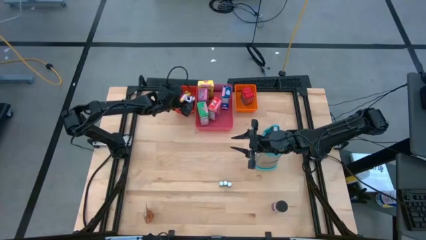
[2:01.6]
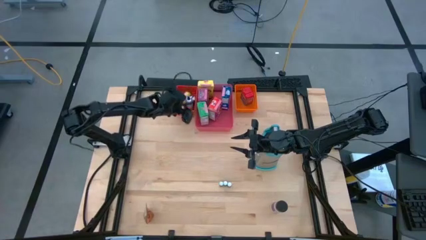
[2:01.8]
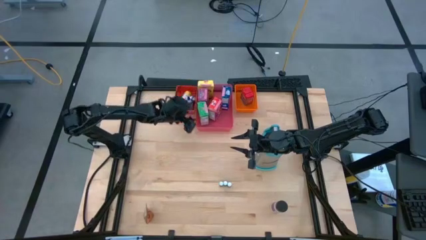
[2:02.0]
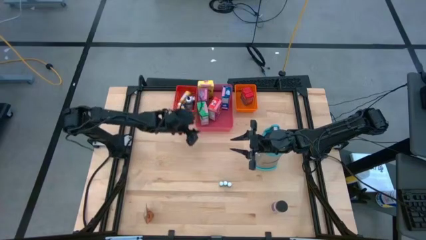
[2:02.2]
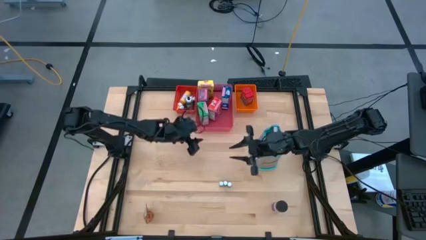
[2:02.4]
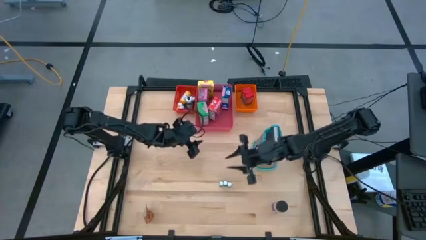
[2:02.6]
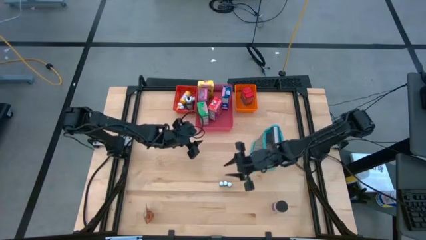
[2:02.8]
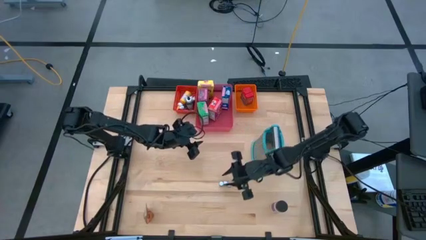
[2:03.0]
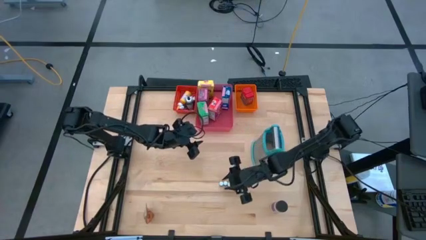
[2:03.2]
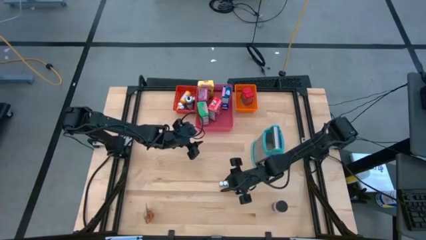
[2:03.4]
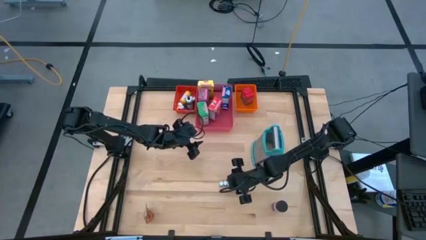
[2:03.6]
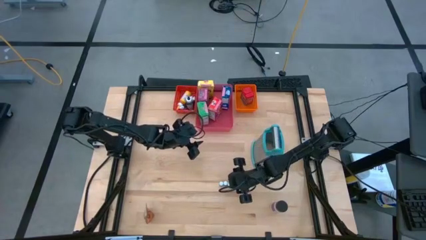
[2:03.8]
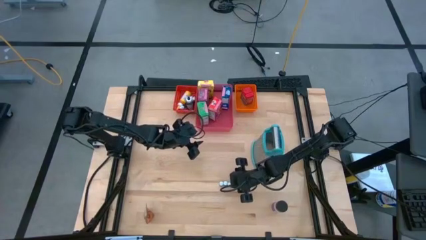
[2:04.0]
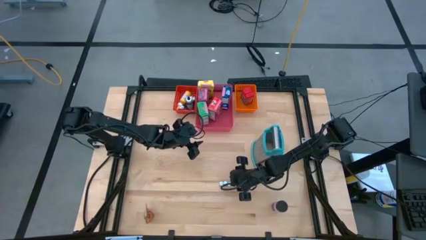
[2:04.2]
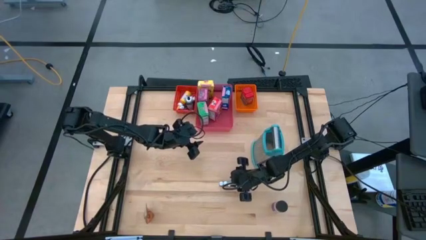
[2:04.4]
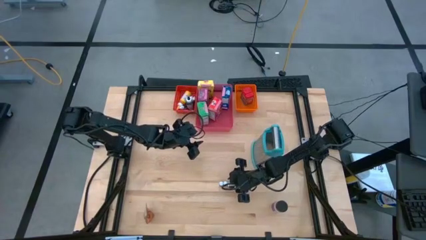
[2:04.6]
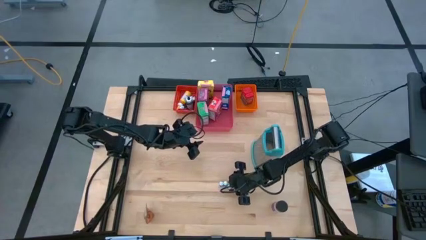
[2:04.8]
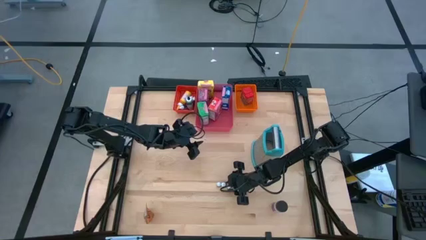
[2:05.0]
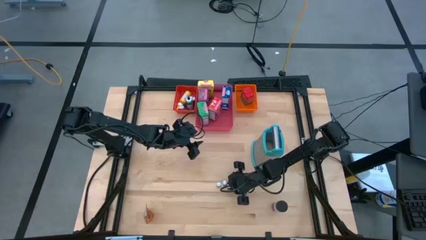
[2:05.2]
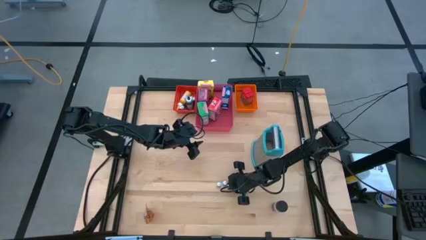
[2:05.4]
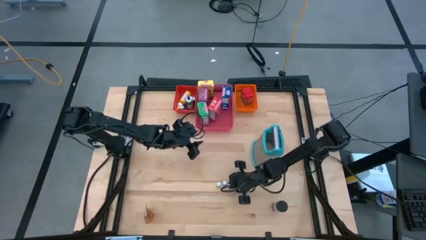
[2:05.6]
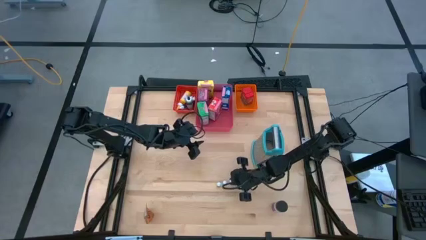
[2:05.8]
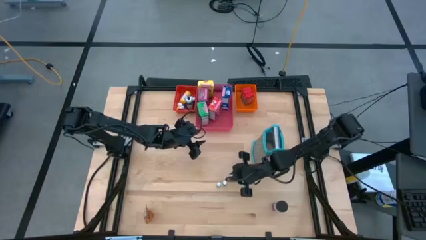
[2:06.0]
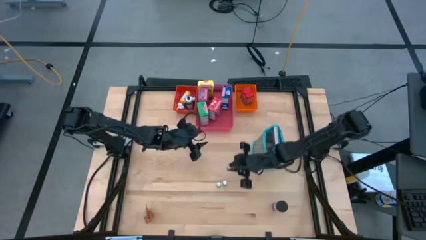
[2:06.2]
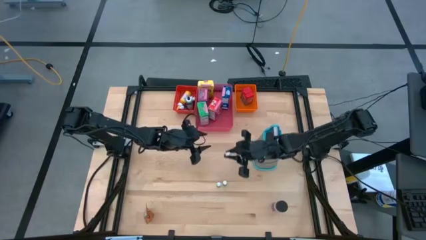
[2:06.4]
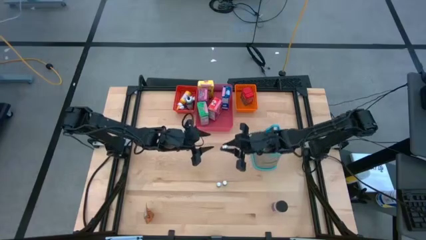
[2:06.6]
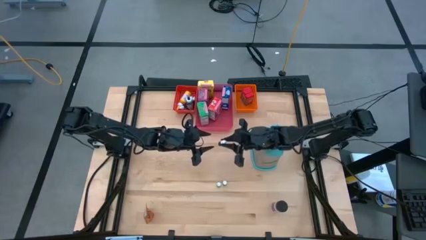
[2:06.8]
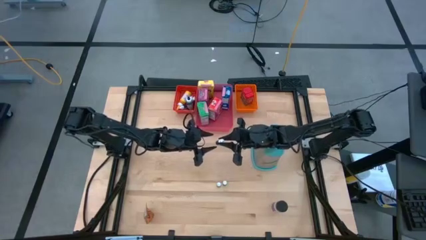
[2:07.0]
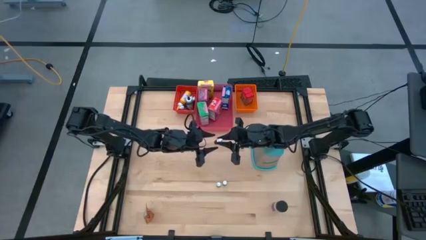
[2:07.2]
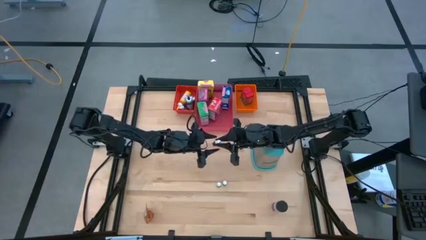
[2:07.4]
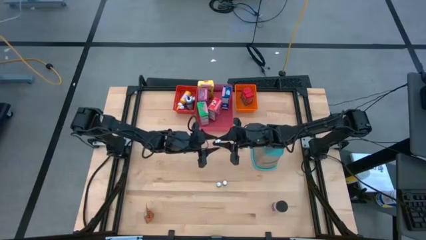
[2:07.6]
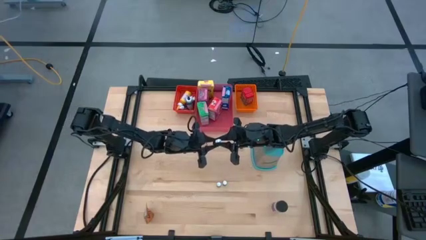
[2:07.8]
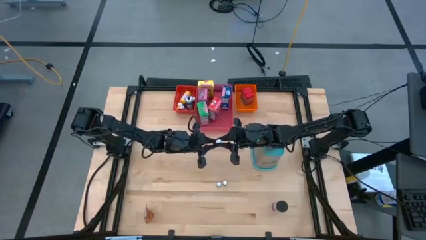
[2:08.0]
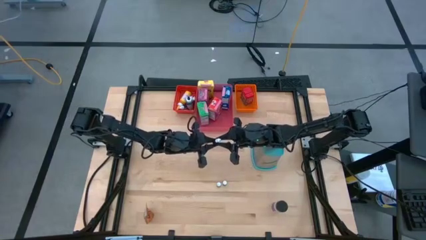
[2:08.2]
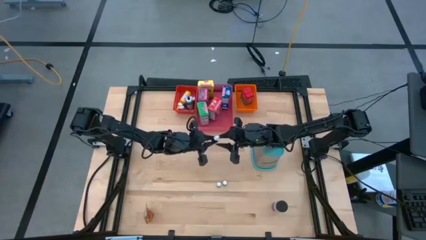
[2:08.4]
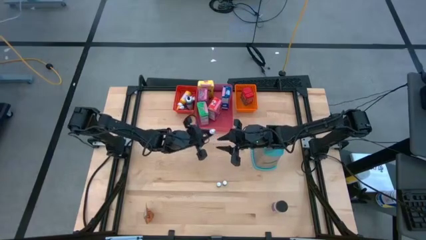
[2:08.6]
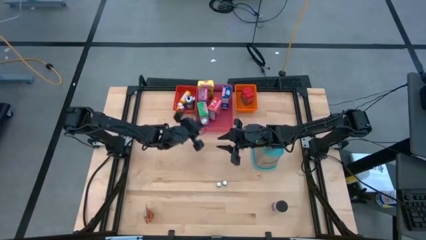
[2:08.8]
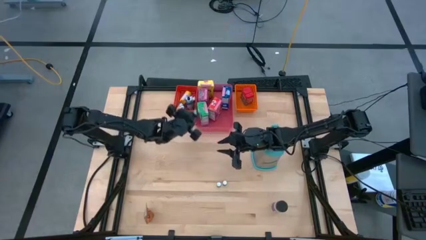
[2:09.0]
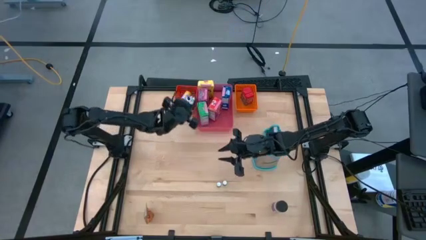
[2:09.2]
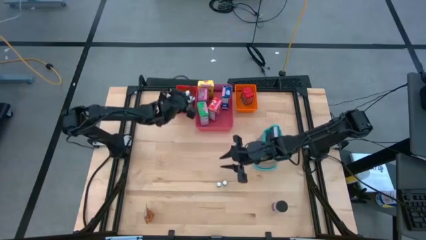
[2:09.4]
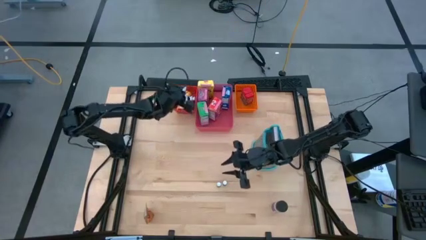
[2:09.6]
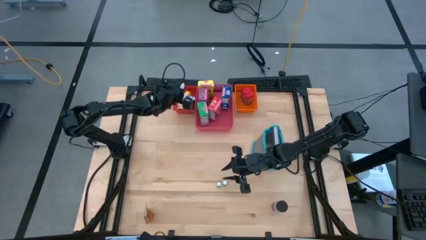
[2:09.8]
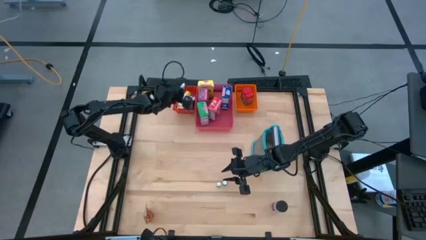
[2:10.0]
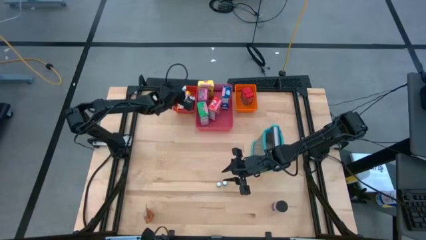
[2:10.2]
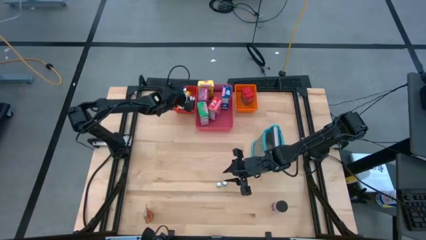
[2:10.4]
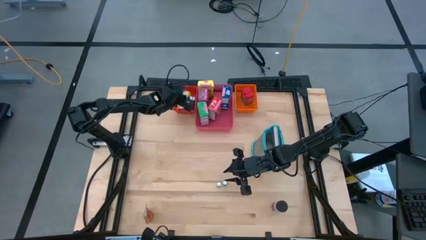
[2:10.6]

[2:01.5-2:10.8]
Task: Pick & Place Kitchen Items
Put the small black food coloring bottle into the red bin

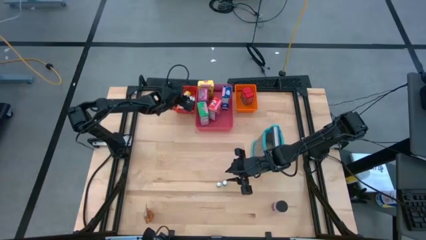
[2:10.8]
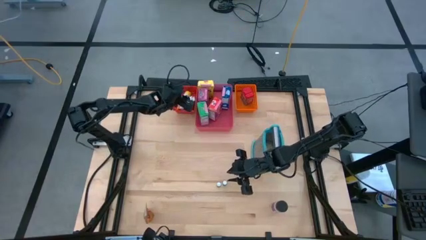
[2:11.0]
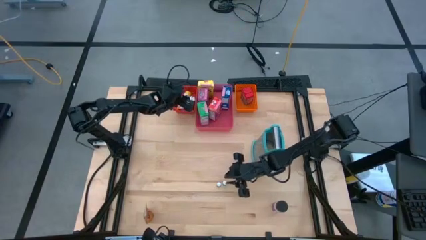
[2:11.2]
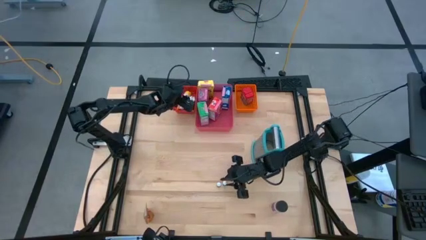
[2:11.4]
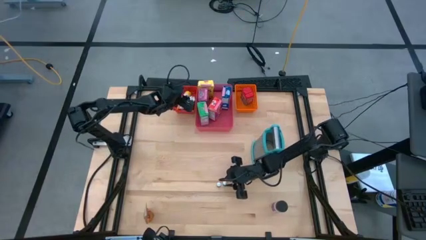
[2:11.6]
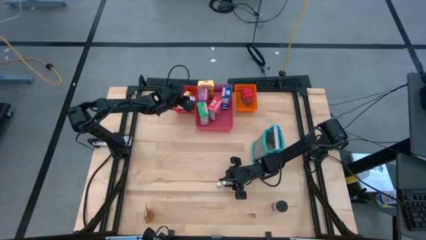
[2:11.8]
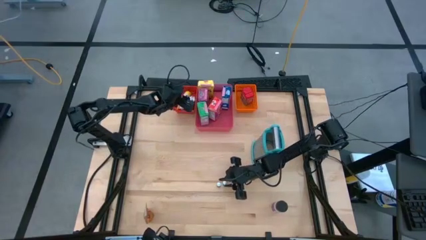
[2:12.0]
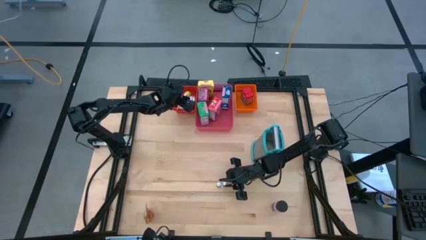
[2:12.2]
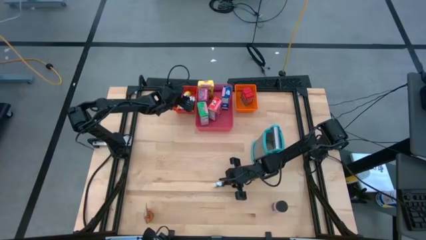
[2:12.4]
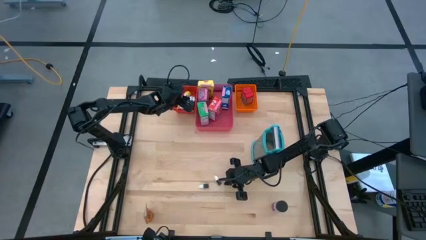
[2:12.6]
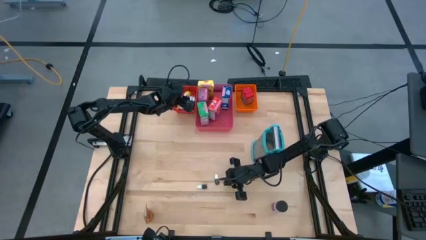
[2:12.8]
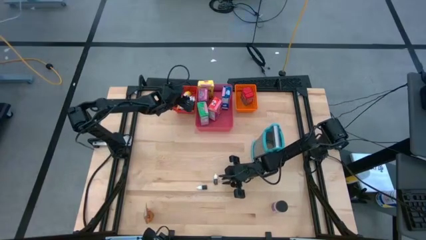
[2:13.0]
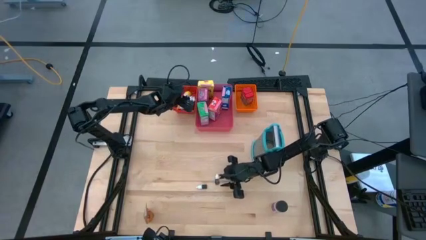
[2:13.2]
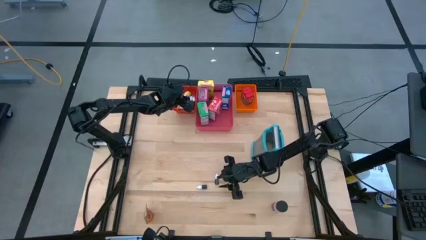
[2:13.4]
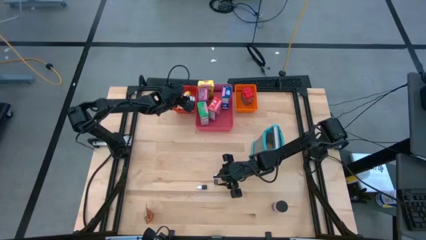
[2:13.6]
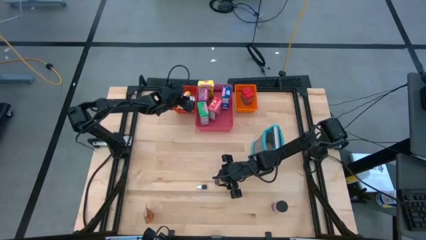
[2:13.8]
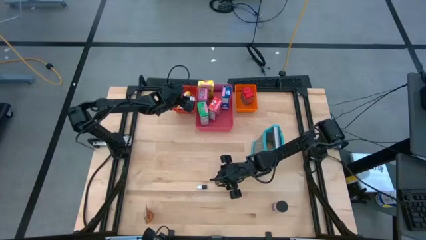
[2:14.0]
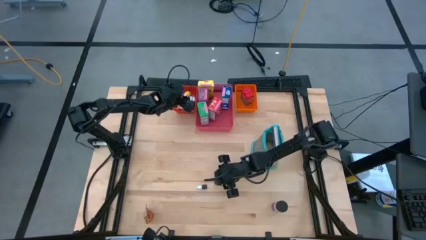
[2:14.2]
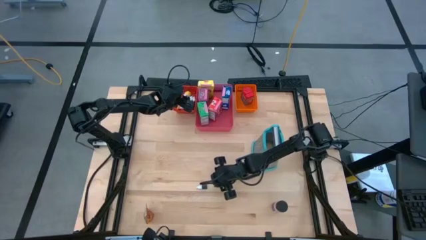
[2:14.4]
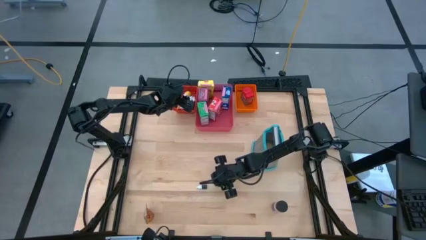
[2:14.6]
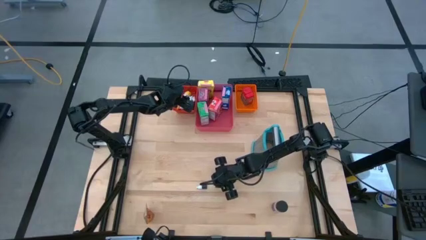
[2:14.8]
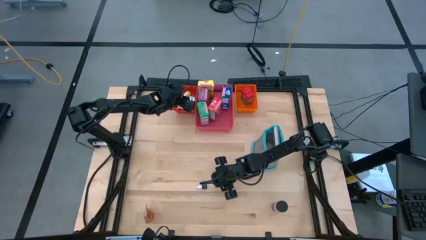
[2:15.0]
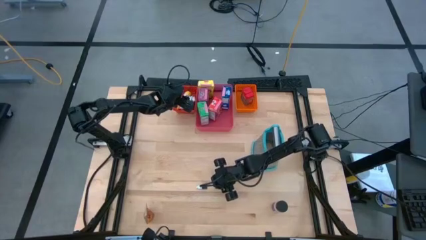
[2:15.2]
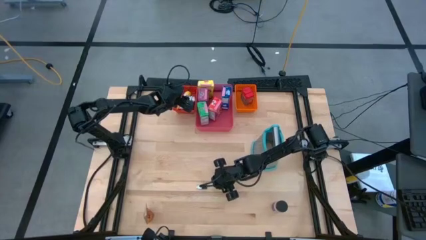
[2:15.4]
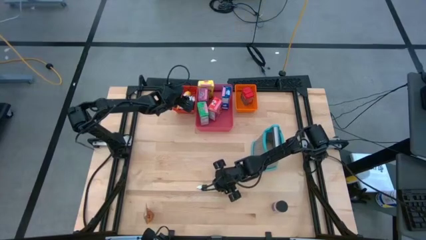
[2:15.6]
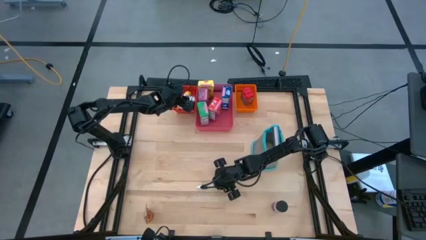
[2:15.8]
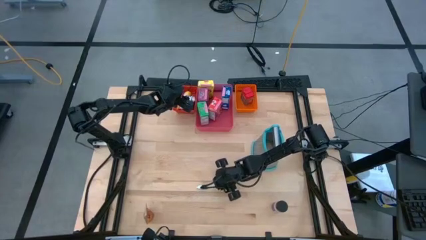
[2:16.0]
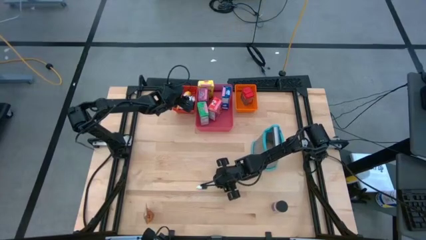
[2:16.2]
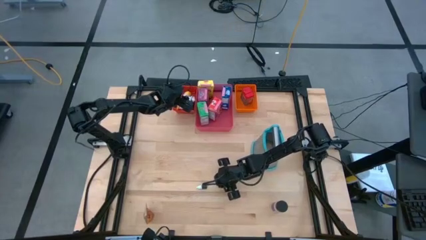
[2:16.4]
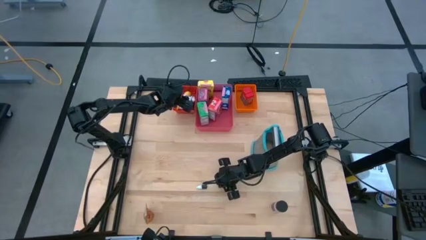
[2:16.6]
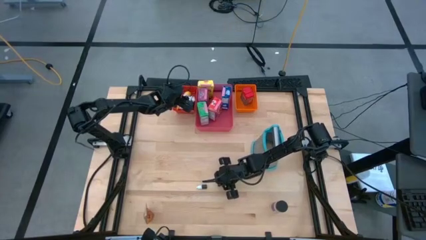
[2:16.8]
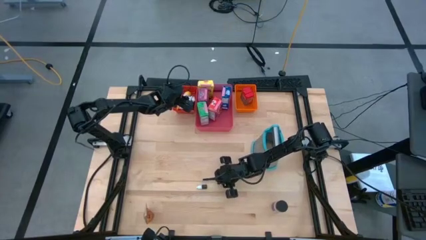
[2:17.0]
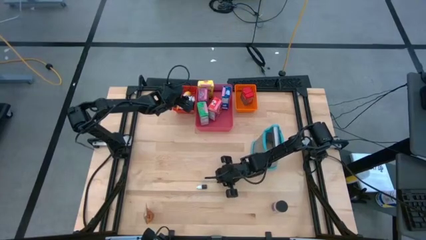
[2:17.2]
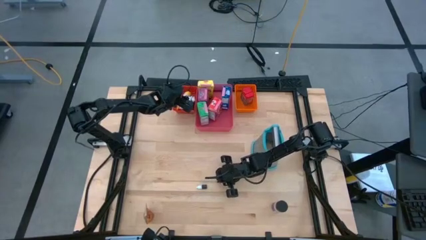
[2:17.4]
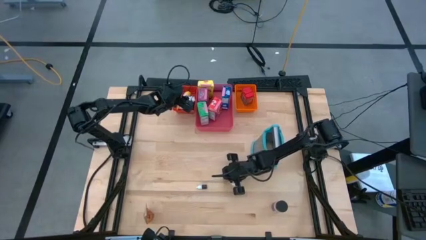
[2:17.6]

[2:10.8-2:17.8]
Put the small black food coloring bottle into the red bin
